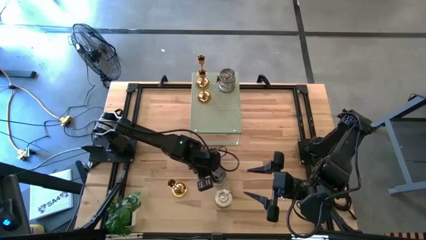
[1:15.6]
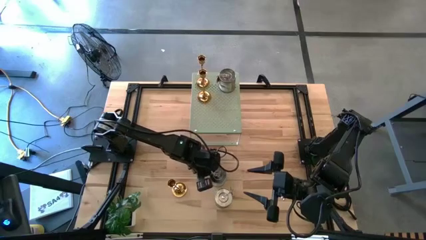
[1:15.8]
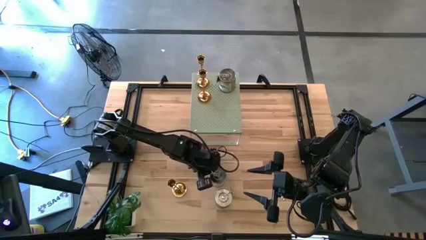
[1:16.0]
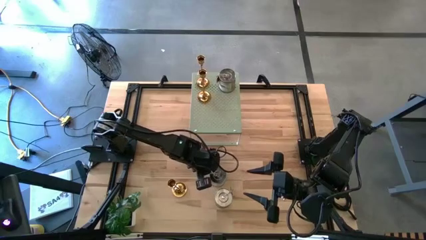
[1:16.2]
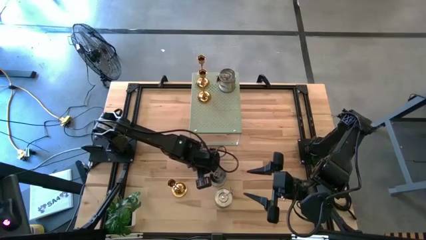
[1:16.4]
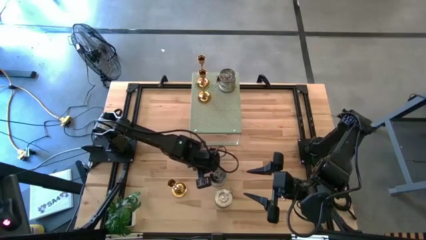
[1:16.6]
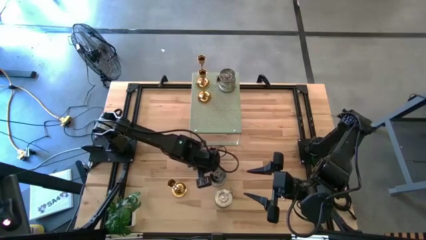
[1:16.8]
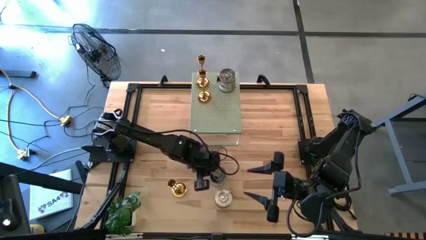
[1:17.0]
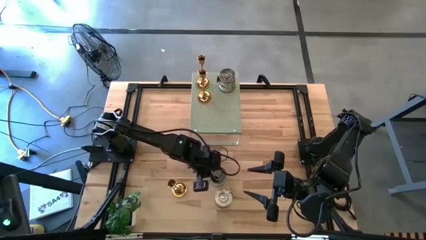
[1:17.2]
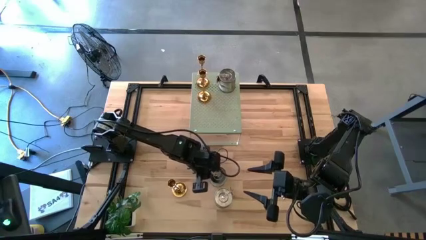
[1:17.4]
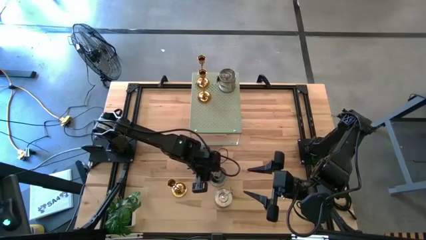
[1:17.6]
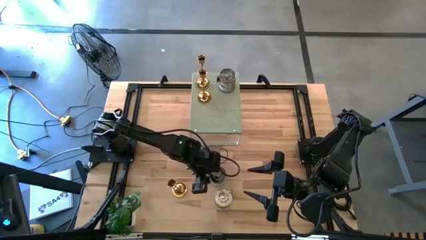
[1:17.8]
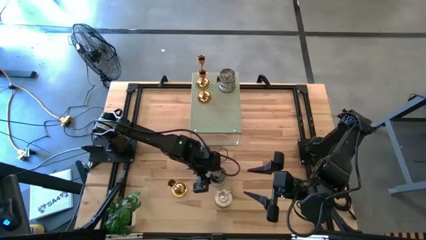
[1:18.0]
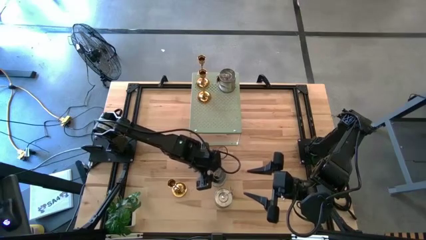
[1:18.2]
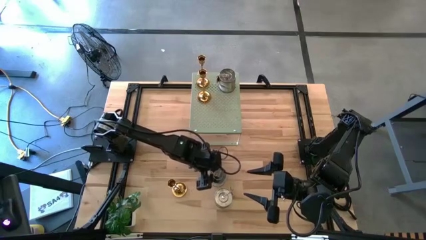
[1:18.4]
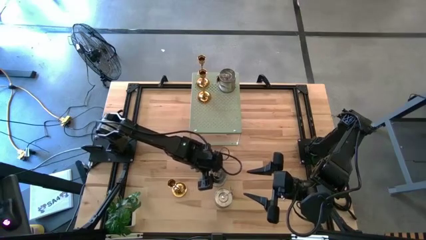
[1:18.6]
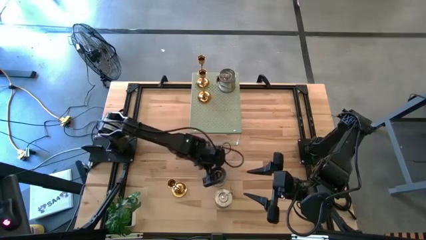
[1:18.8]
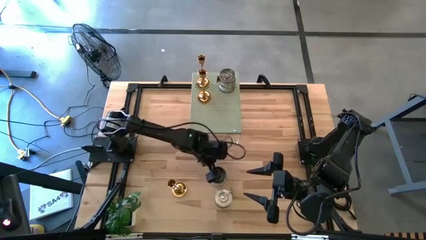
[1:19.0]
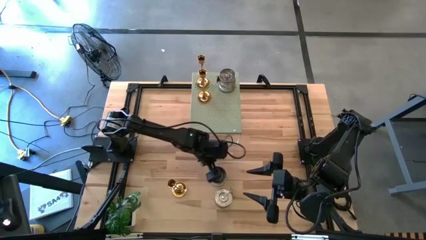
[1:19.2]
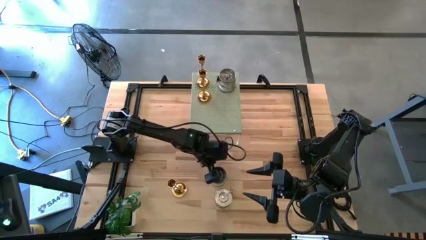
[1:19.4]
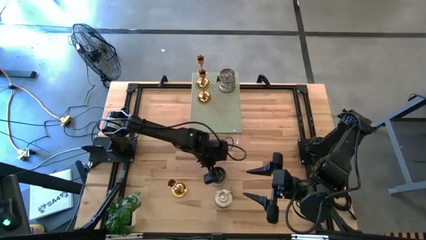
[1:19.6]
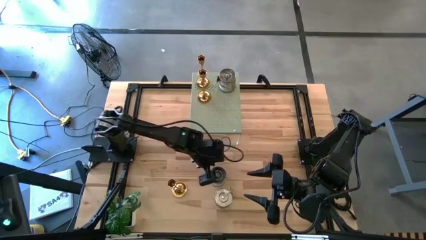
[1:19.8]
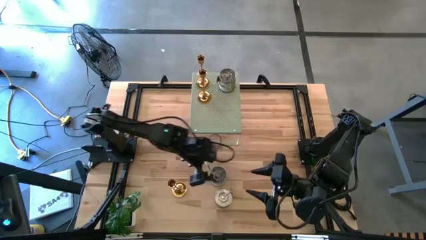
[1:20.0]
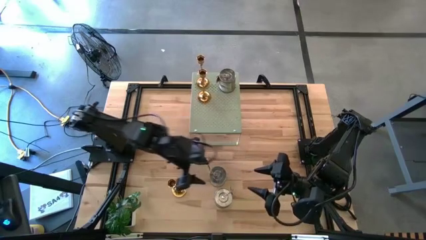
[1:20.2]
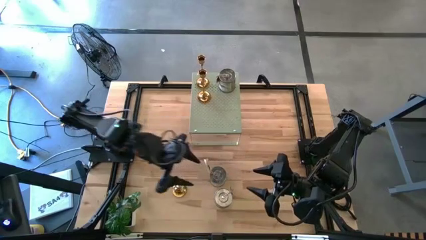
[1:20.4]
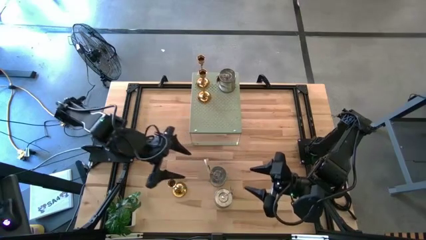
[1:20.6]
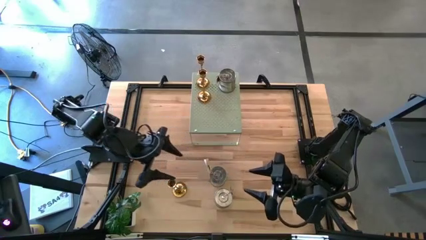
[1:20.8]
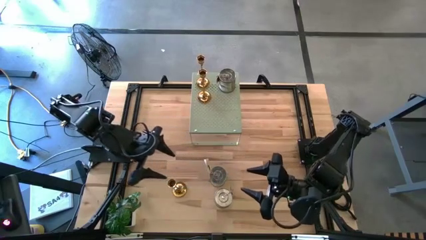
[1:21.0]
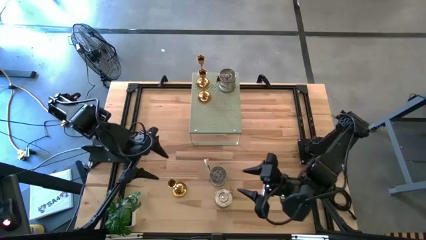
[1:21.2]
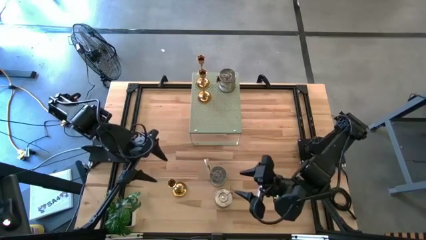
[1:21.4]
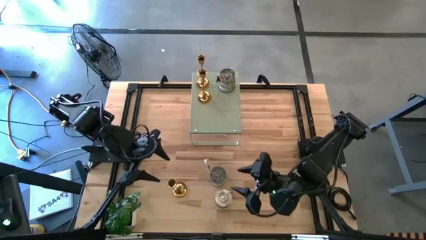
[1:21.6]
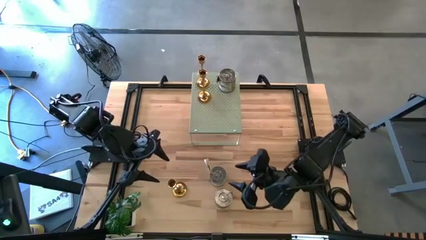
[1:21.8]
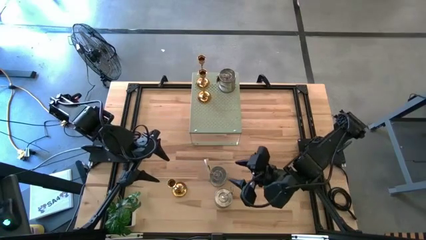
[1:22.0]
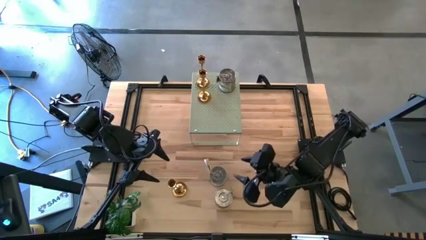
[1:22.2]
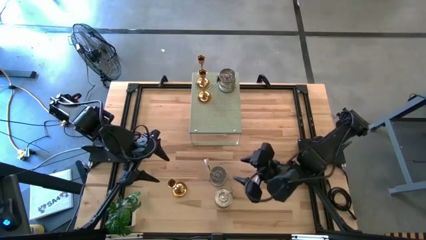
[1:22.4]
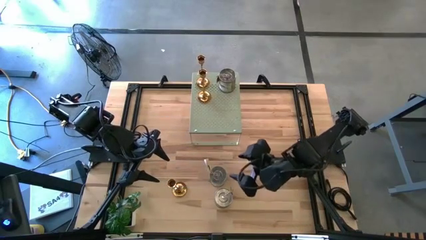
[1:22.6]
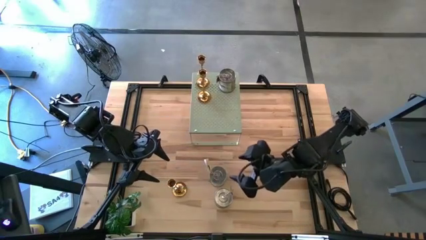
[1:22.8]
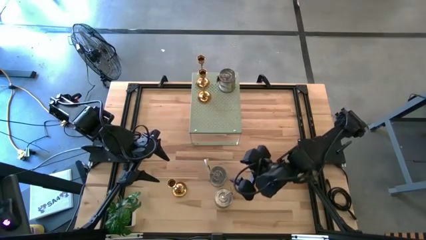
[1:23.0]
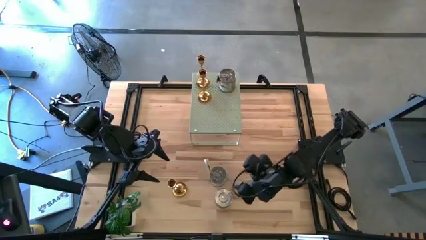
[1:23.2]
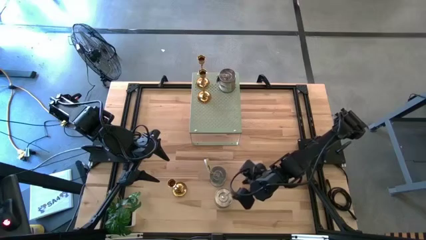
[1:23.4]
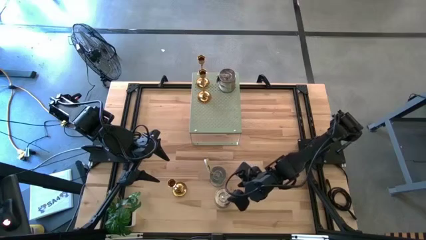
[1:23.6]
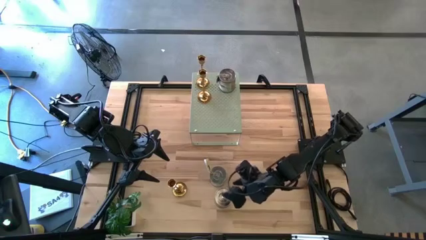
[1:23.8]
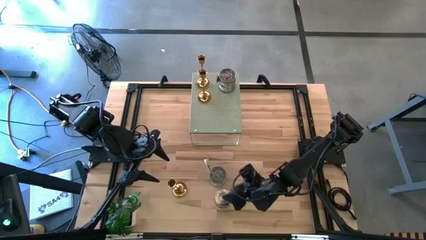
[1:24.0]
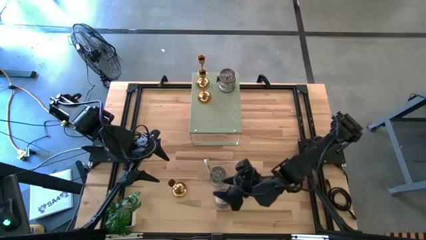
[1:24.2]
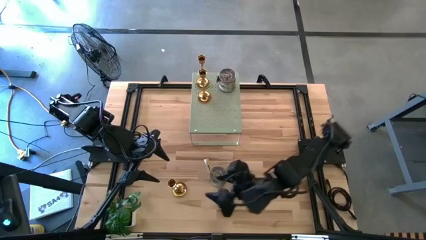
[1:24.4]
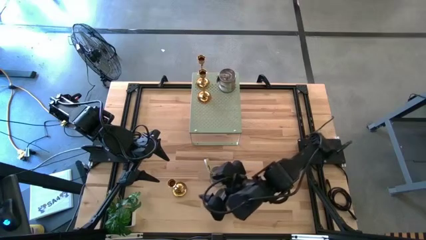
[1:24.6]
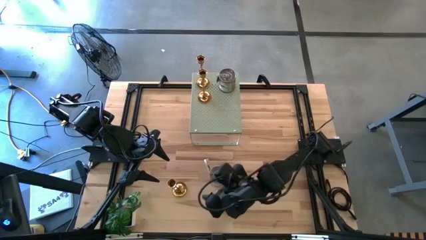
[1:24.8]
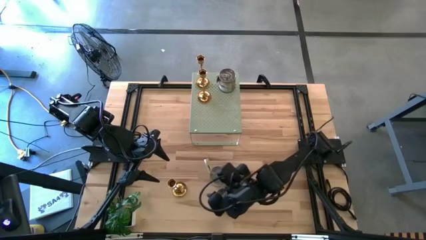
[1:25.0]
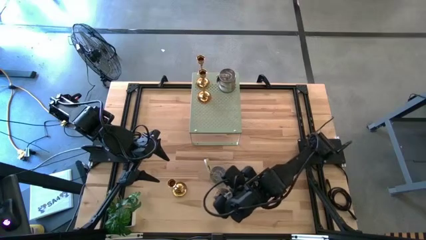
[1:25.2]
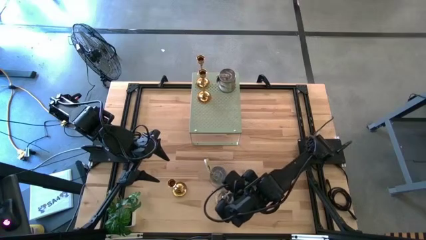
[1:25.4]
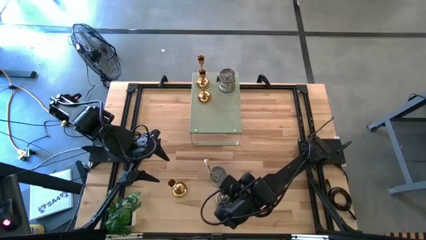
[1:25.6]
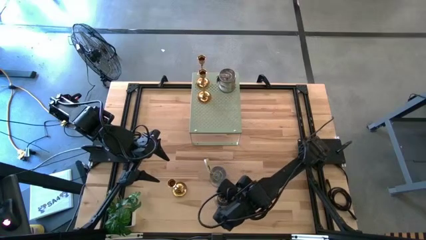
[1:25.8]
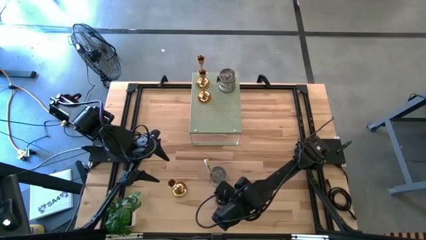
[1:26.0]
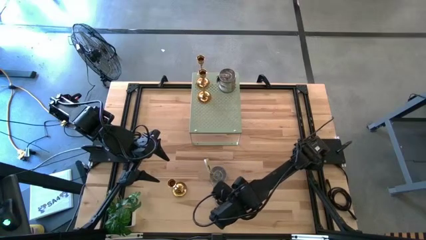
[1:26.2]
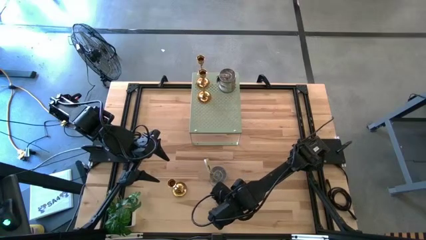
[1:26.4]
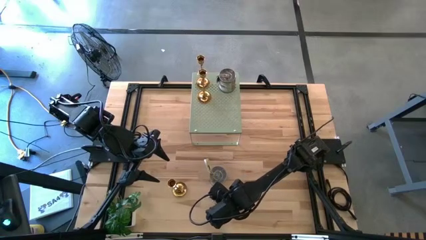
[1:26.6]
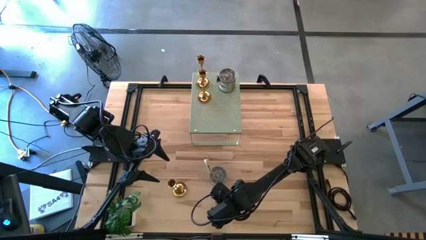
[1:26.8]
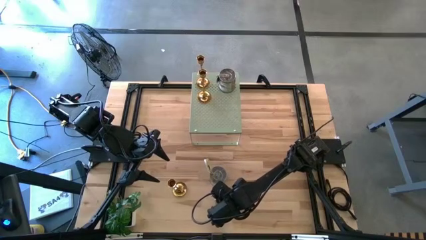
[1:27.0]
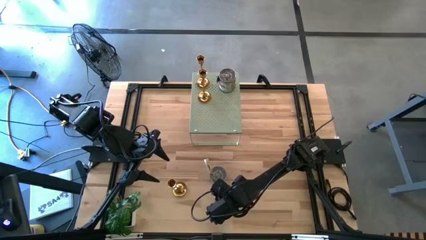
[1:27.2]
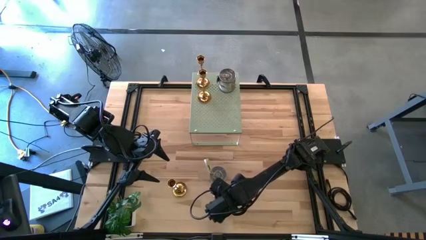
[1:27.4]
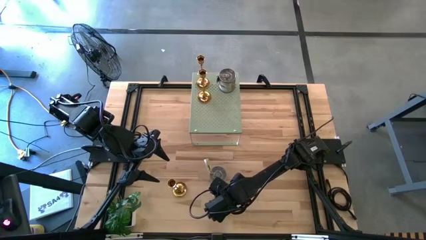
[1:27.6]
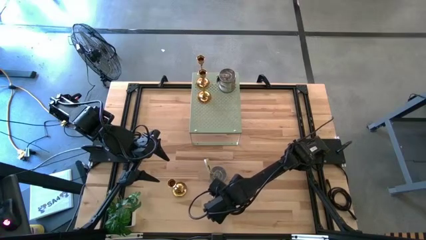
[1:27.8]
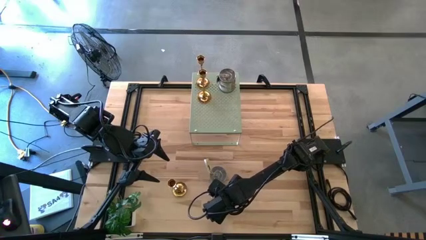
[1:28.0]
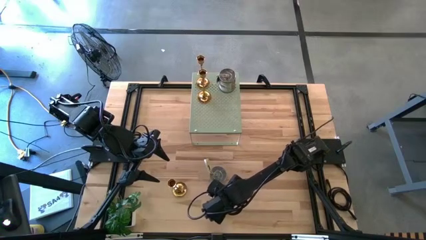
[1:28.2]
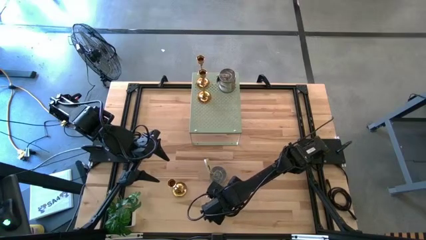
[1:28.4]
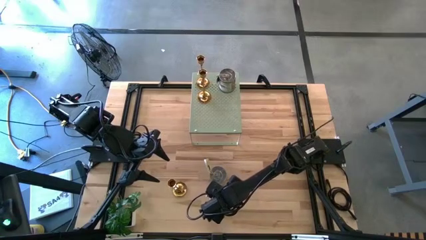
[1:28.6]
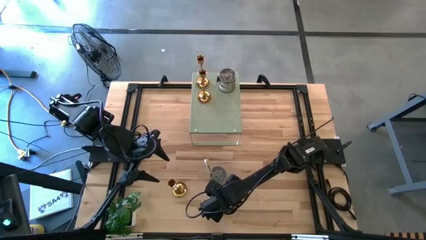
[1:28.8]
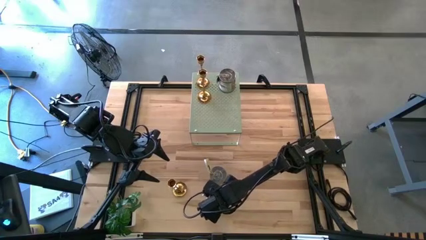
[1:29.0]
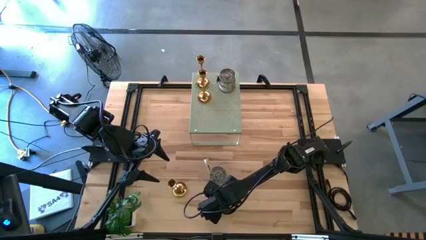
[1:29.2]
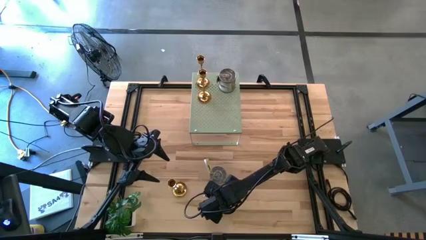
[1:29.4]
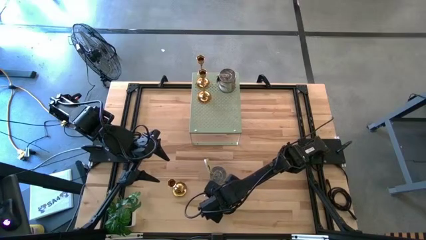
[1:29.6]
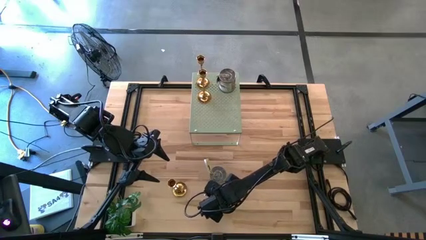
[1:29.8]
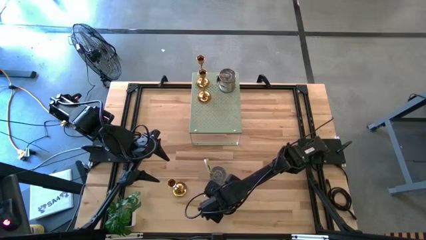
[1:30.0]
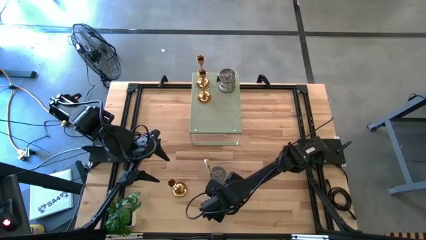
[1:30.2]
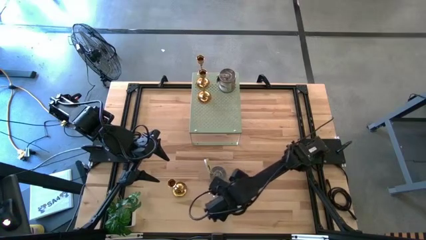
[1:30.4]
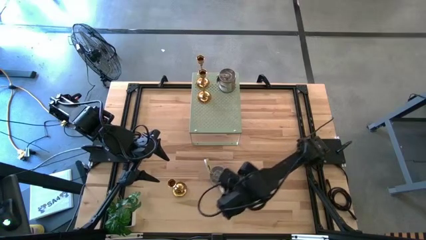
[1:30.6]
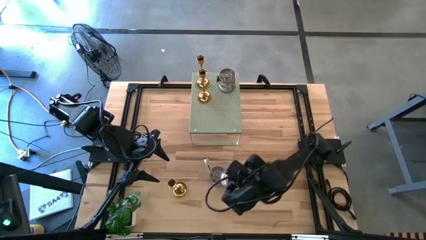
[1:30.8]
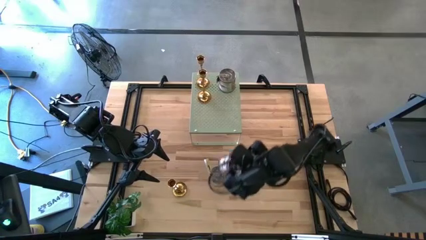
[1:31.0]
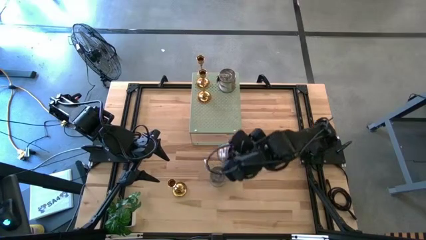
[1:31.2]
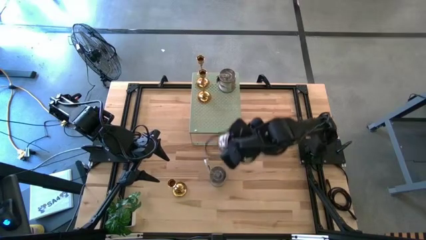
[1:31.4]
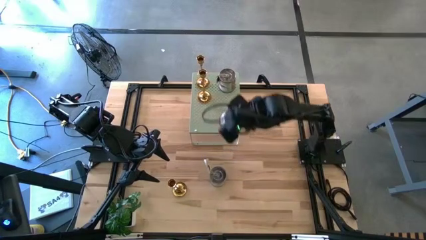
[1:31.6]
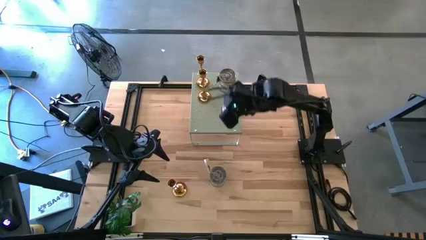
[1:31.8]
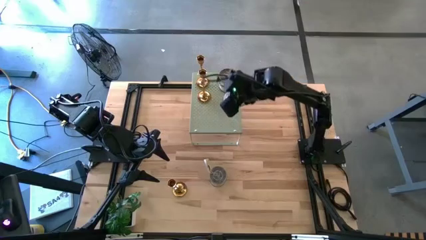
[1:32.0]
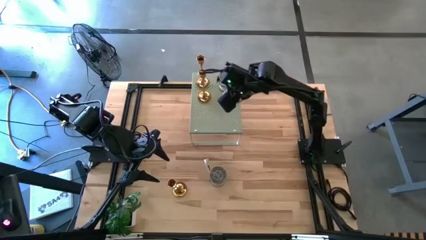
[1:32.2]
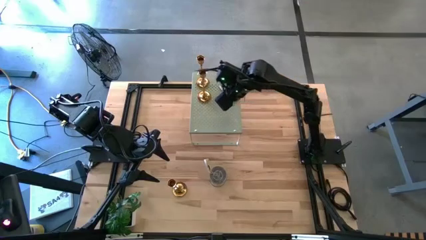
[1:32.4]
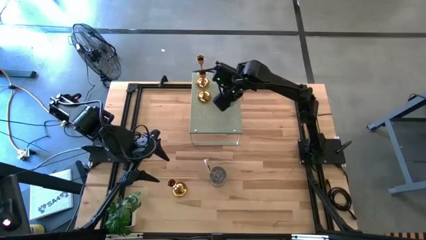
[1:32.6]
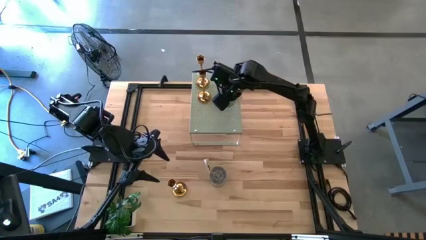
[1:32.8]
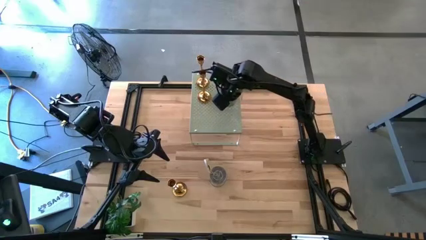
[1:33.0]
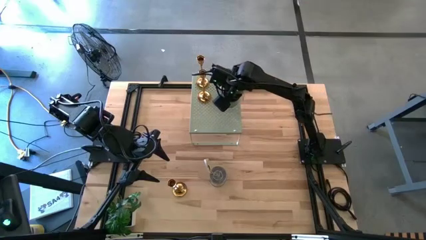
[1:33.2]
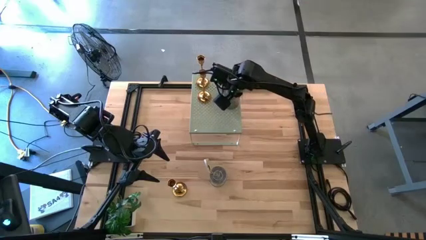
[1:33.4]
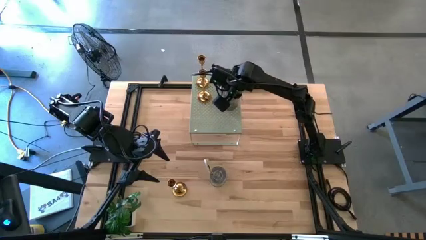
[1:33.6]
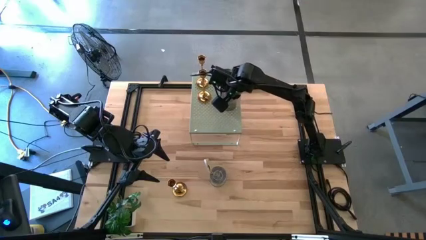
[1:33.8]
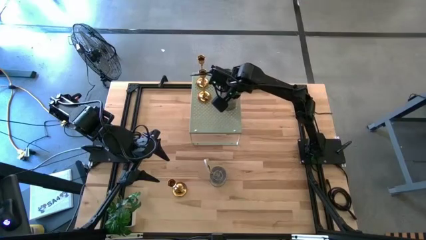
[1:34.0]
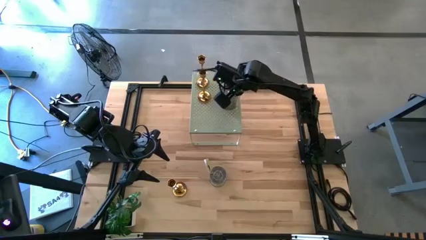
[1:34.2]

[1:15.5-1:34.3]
Task: Pick & Place candle stick holders
Put the brown scented candle on the shelf aligned with the other green scented candle
